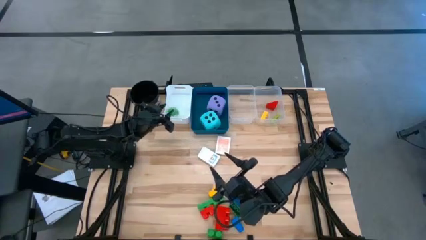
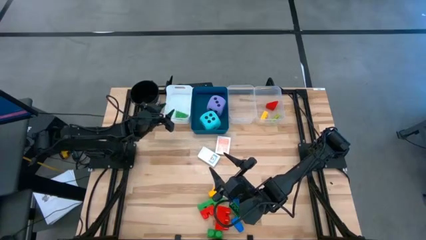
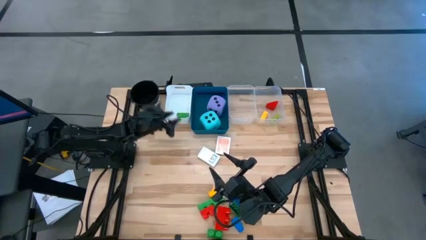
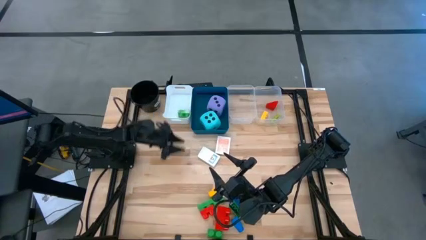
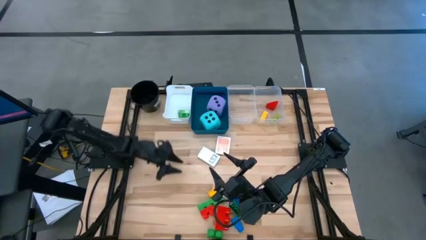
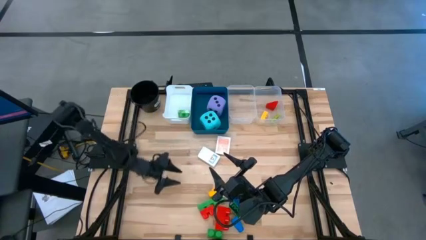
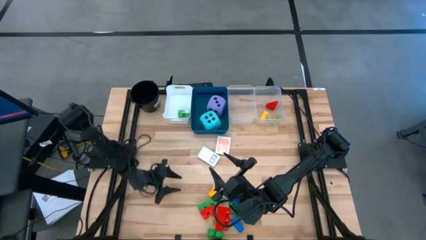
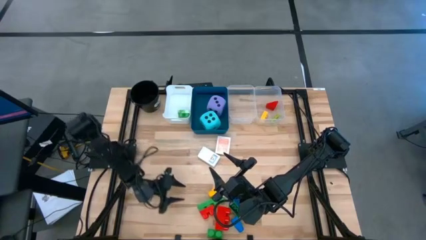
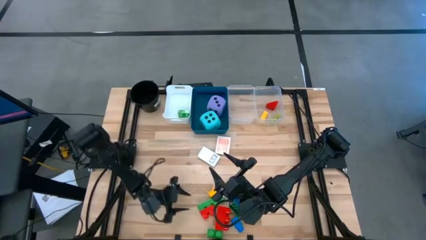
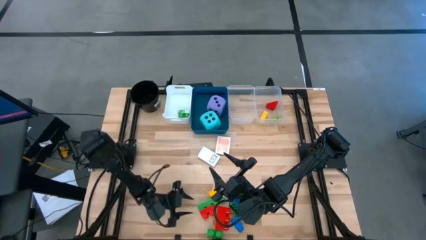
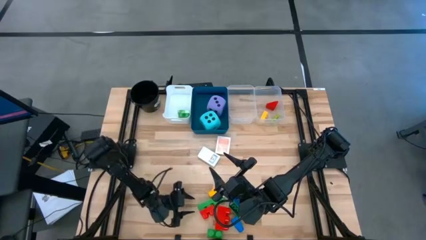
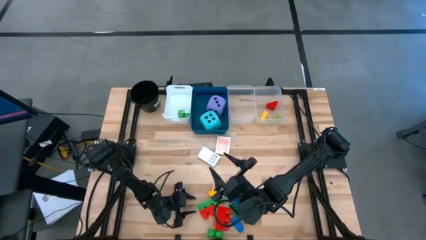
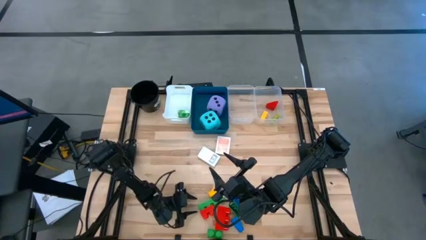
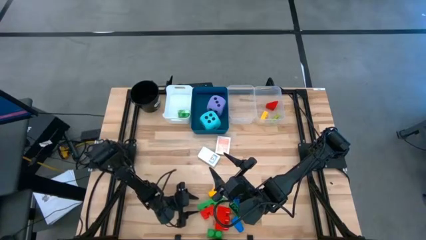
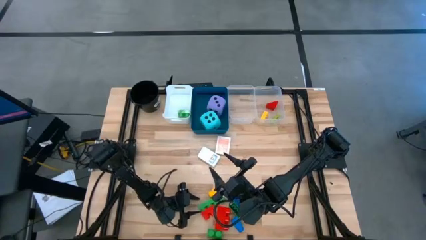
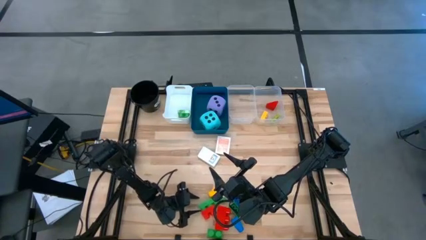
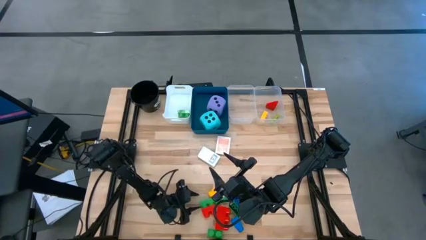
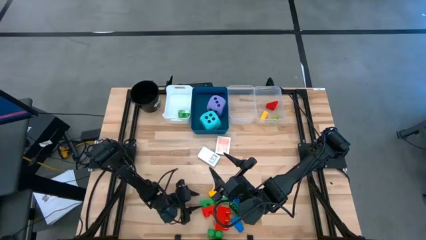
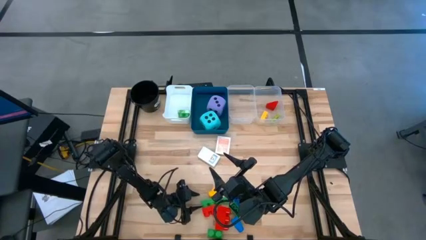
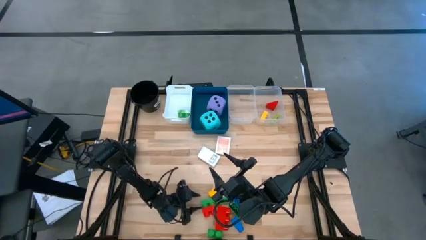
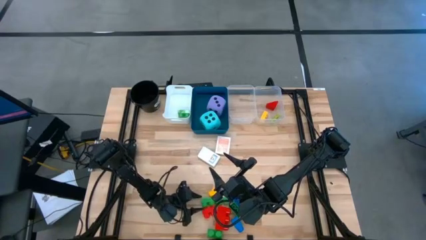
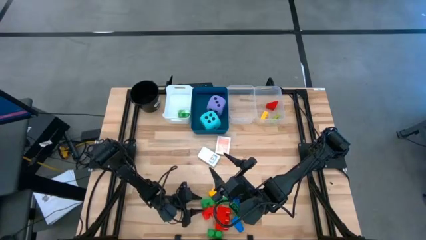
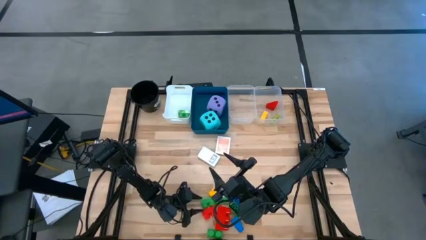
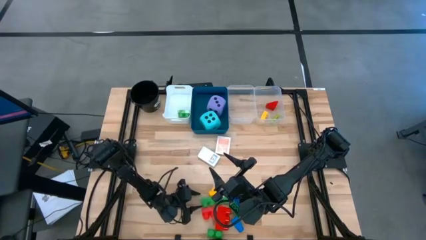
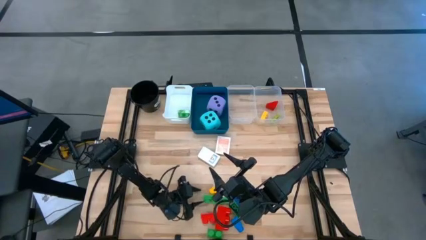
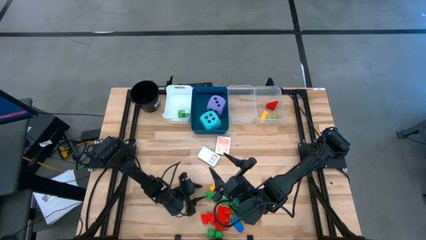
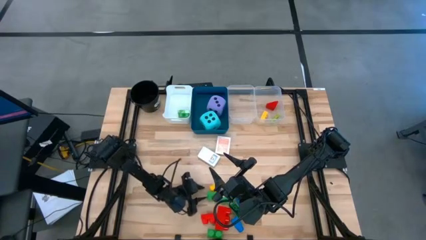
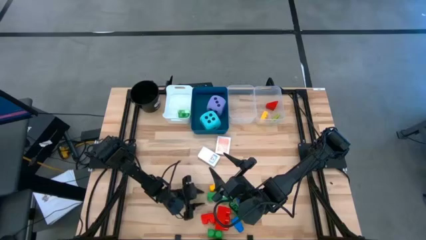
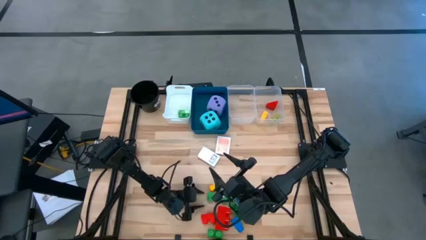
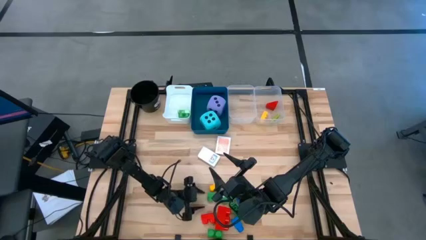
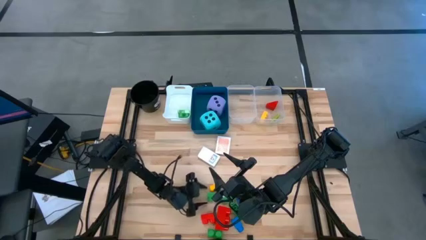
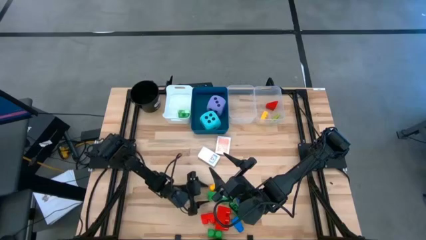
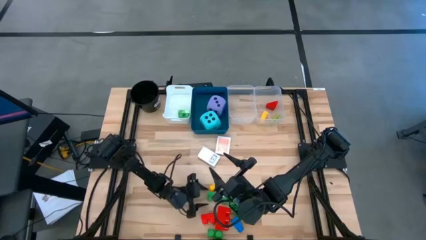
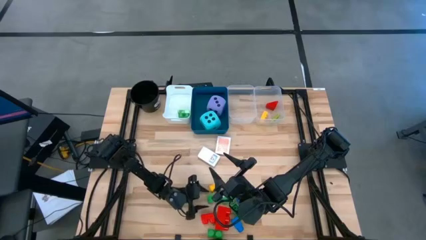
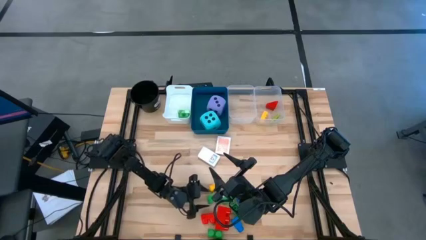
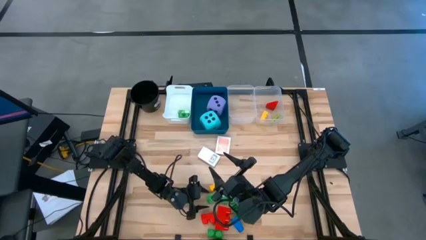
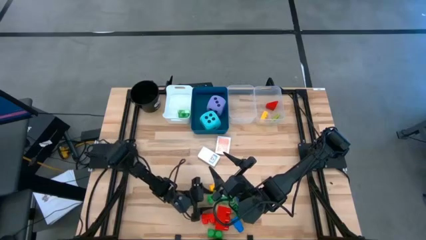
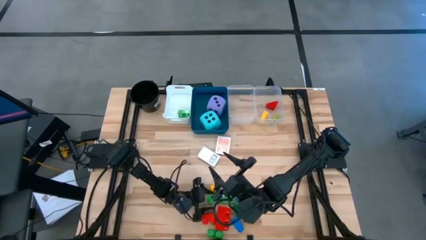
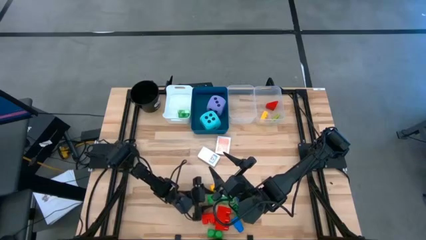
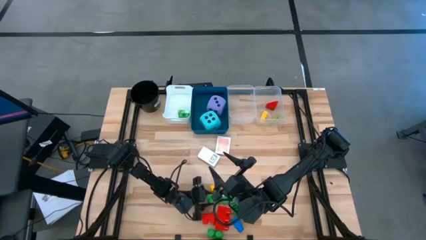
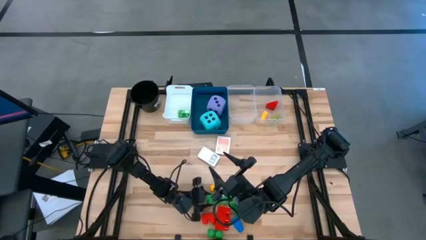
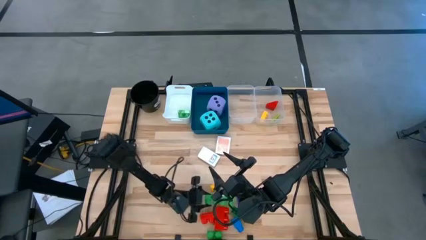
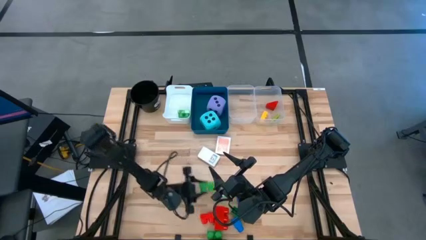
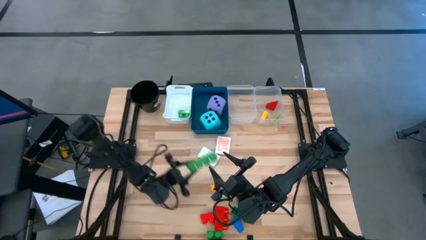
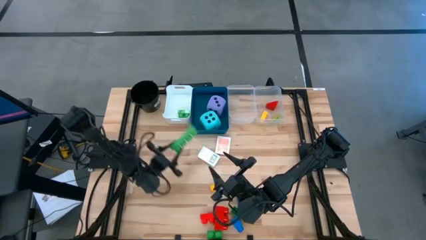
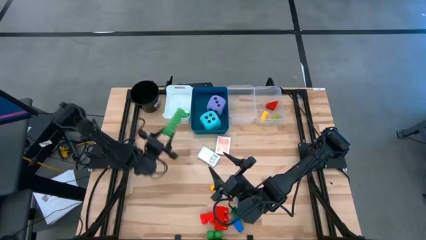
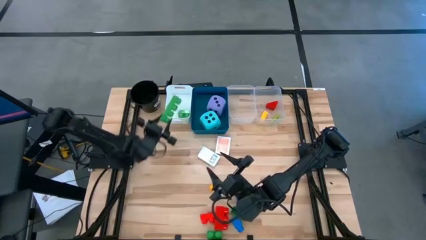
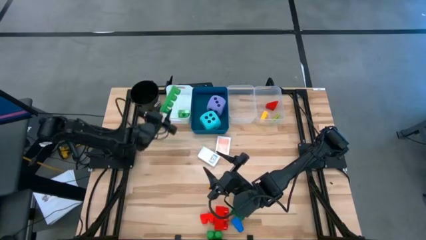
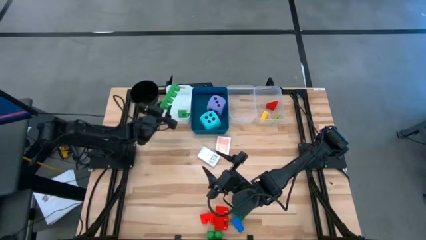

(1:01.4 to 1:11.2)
Task: Pick & Place Toys
Put the large green game piece into the white bin

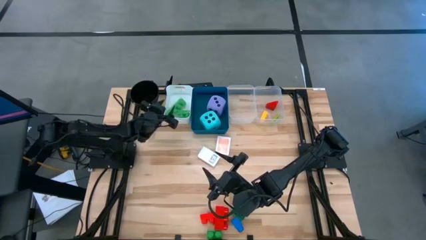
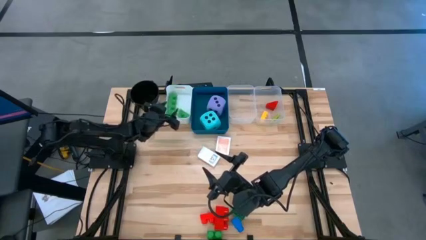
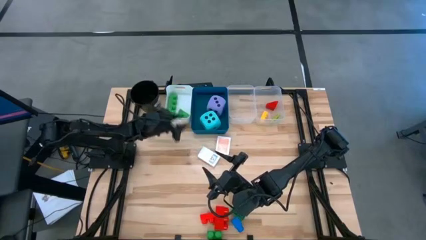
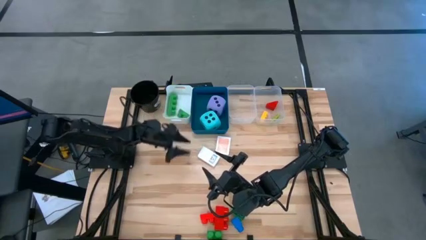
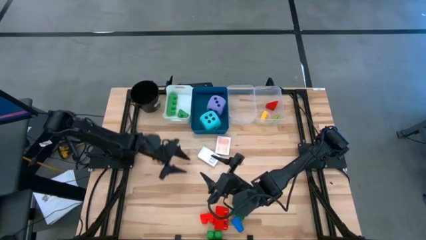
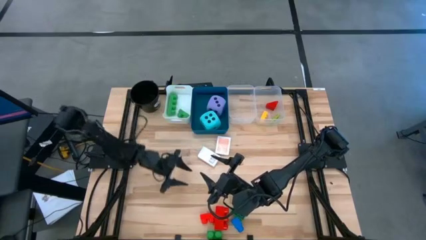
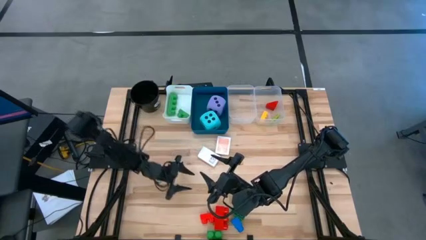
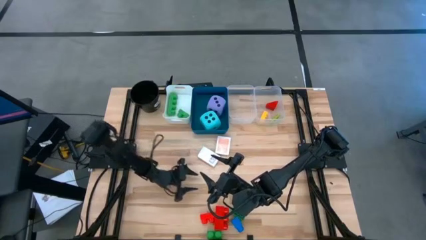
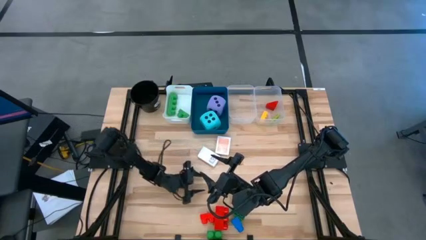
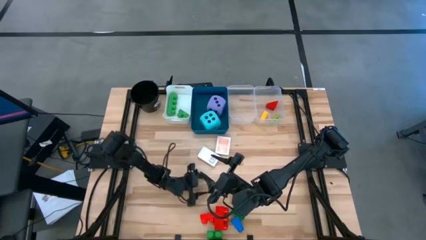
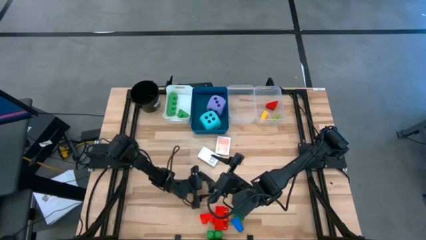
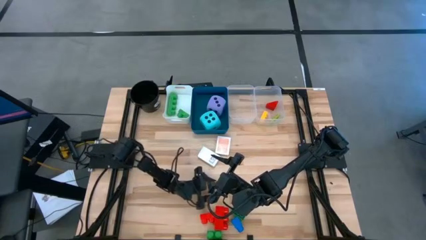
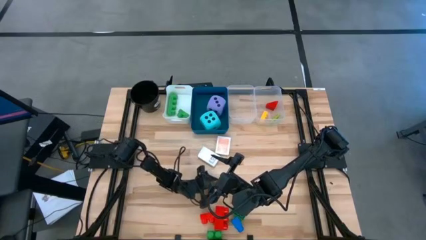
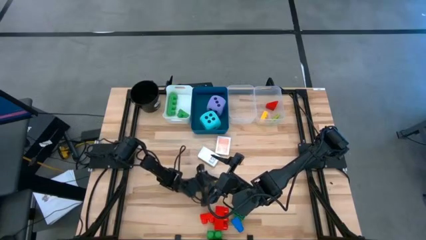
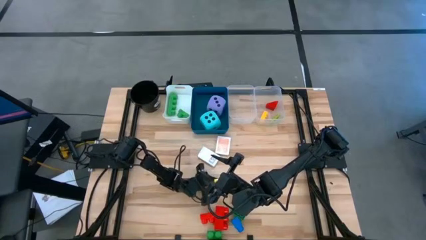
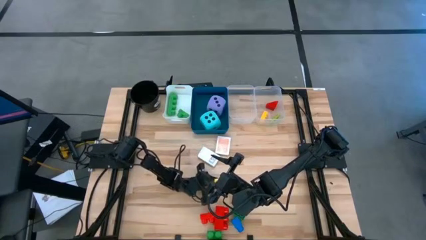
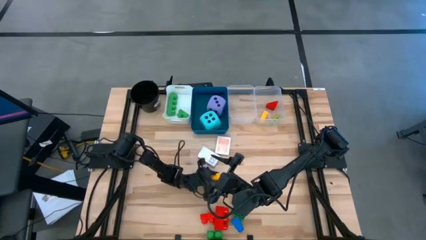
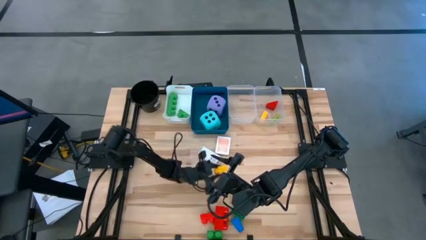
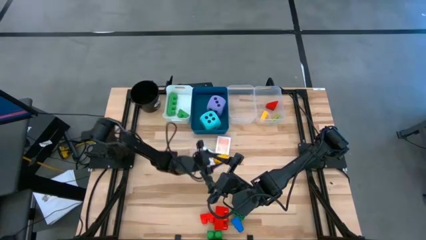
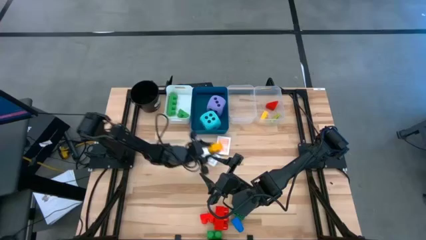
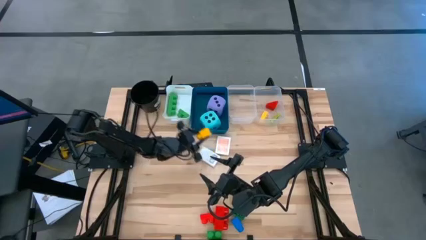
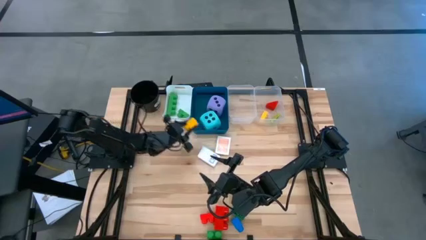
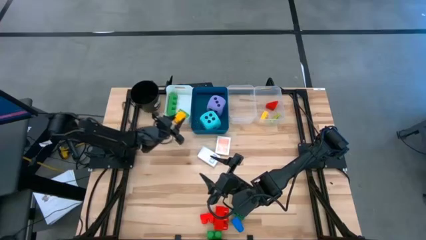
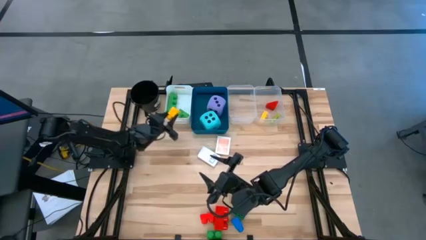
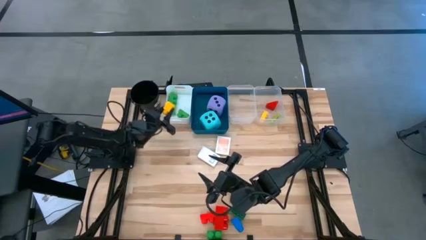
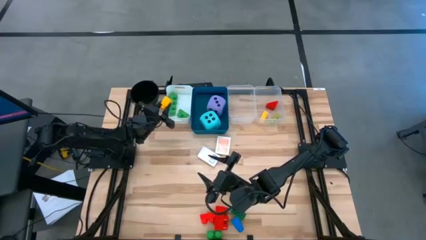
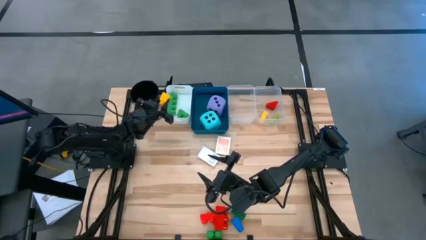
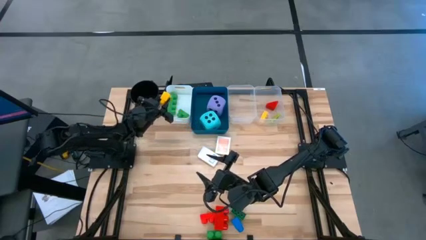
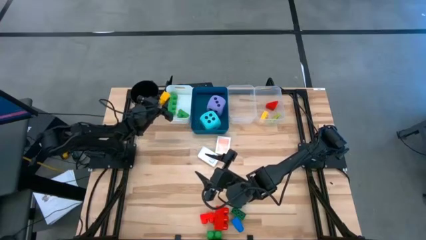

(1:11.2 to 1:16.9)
Put the large yellow game piece into the white bin
